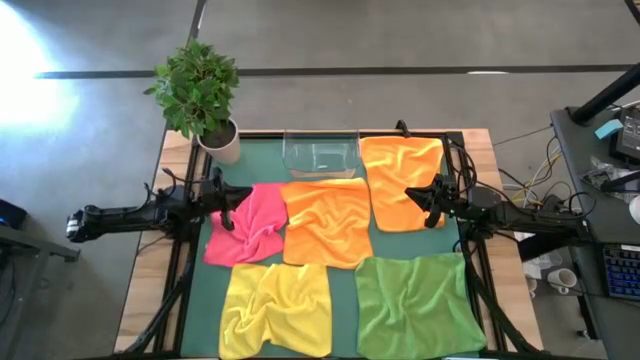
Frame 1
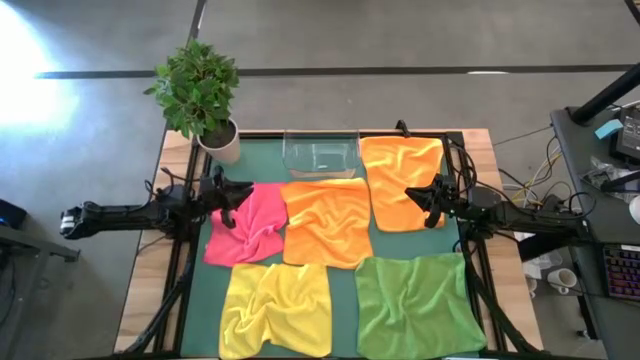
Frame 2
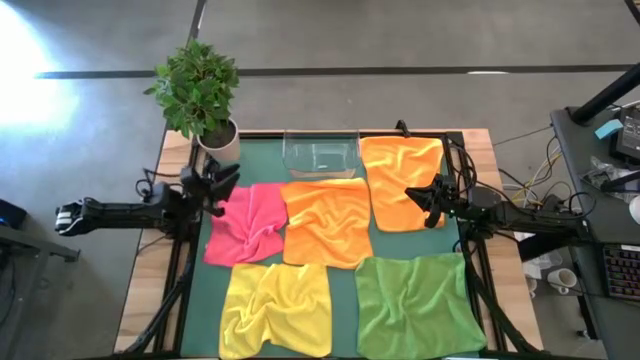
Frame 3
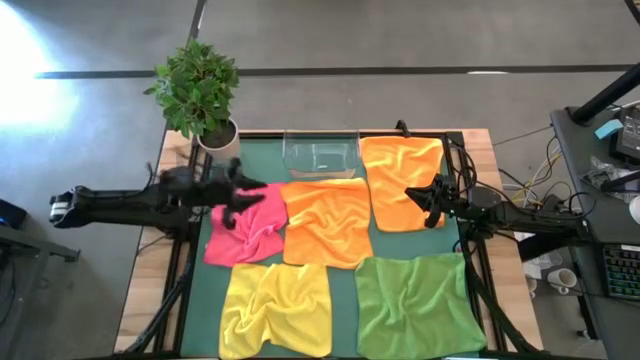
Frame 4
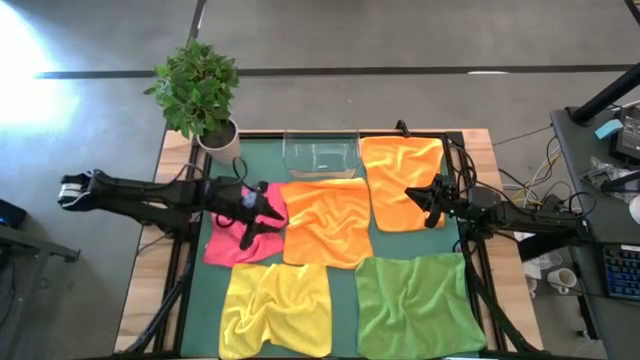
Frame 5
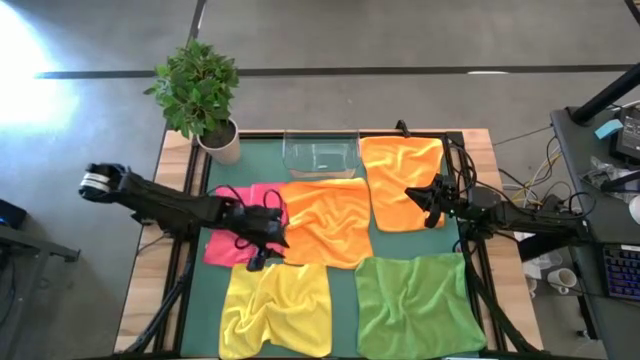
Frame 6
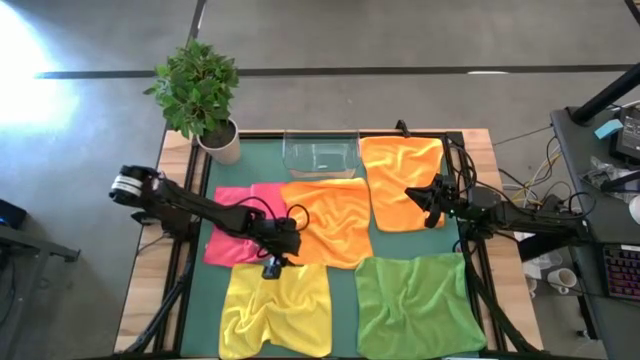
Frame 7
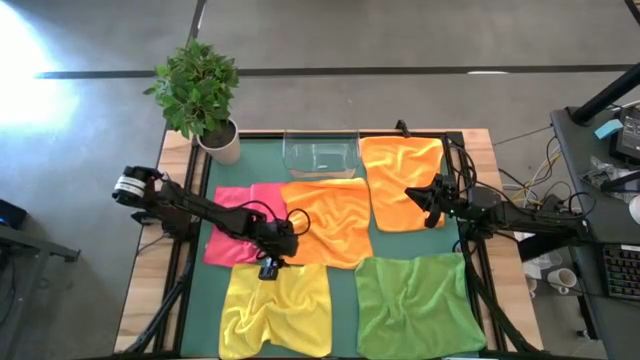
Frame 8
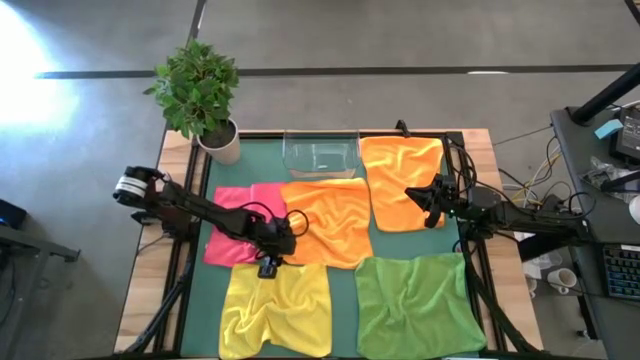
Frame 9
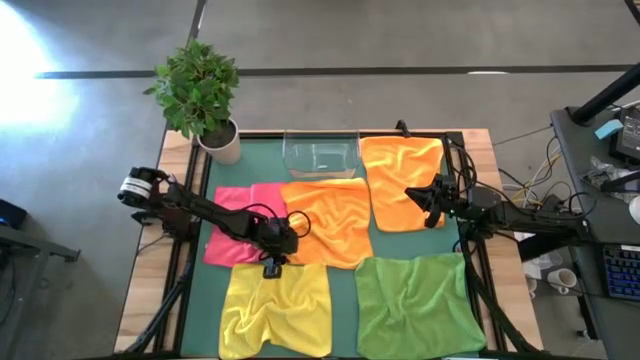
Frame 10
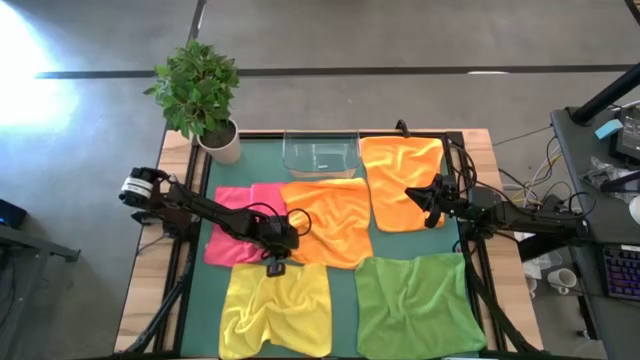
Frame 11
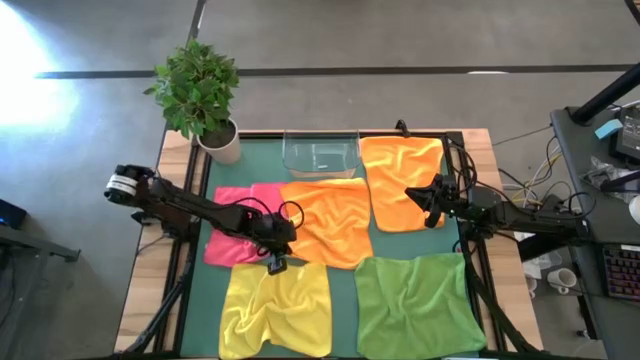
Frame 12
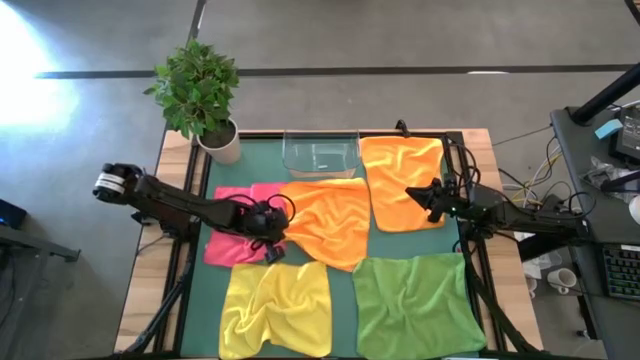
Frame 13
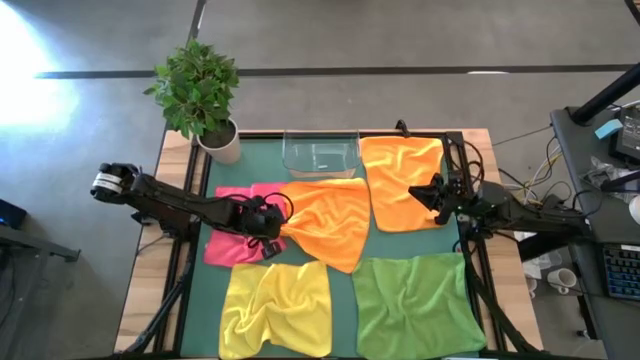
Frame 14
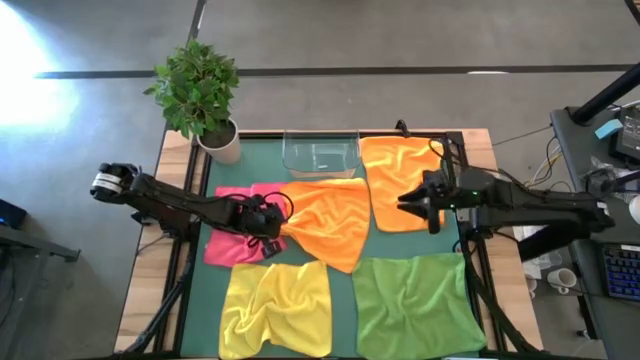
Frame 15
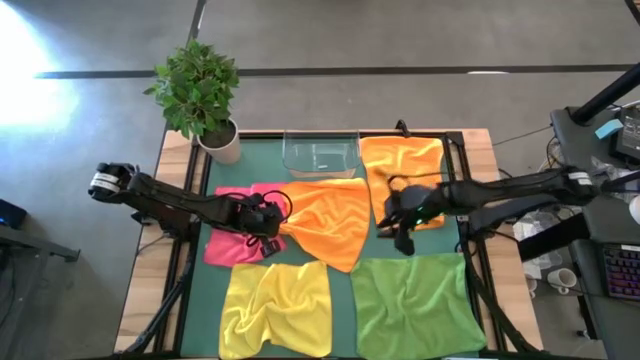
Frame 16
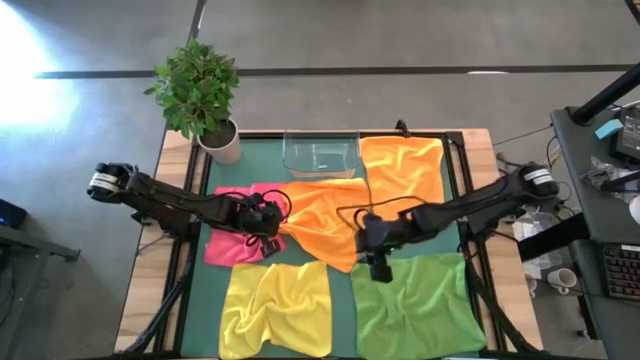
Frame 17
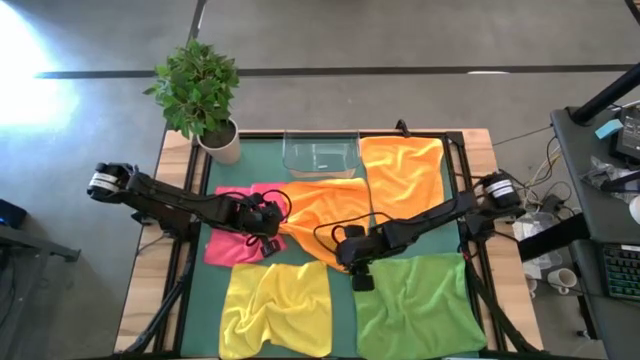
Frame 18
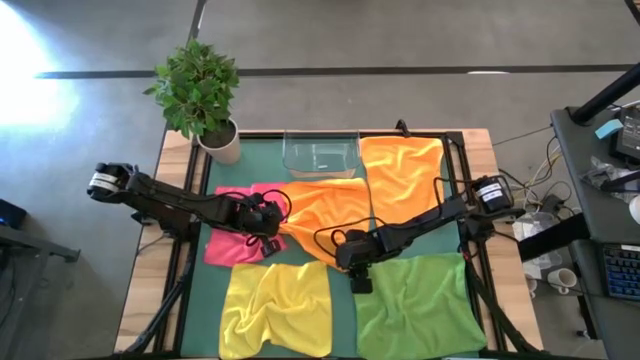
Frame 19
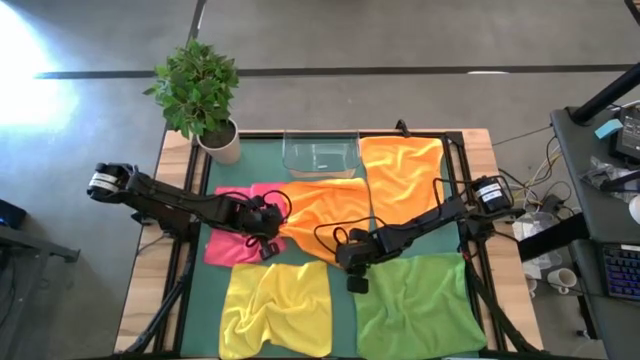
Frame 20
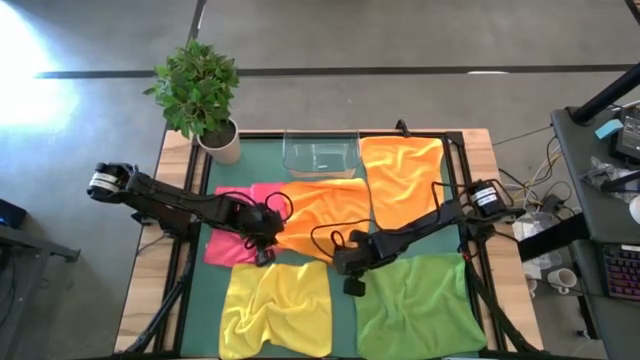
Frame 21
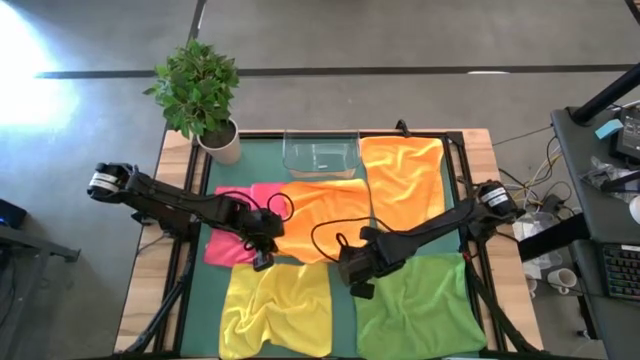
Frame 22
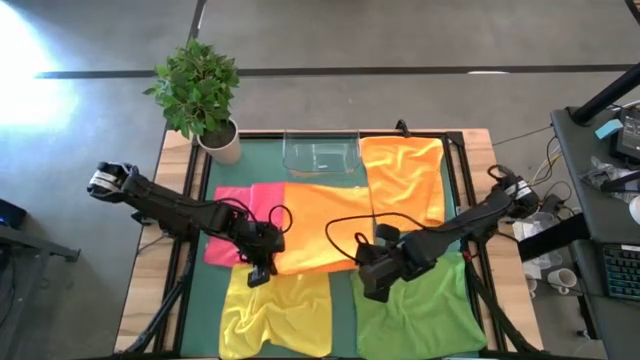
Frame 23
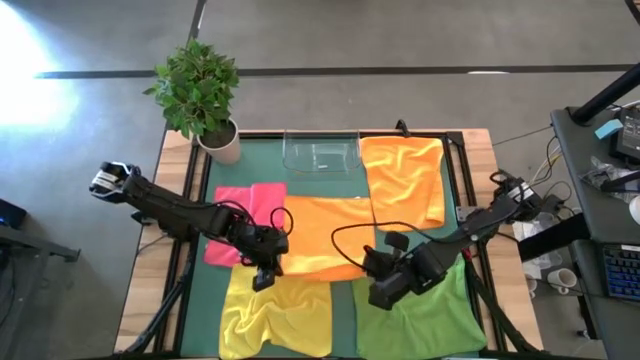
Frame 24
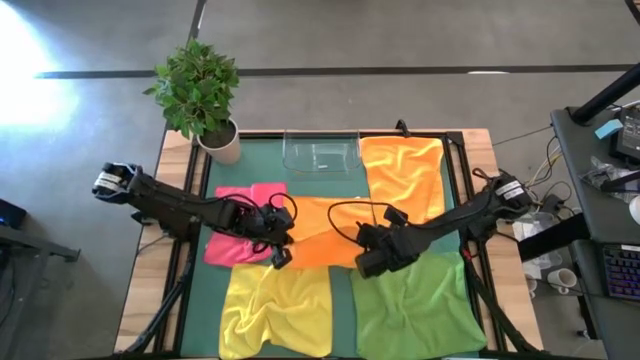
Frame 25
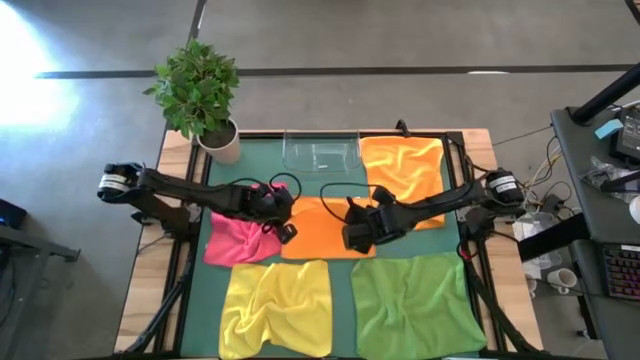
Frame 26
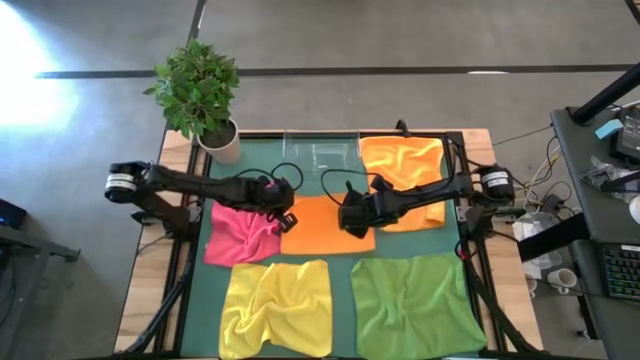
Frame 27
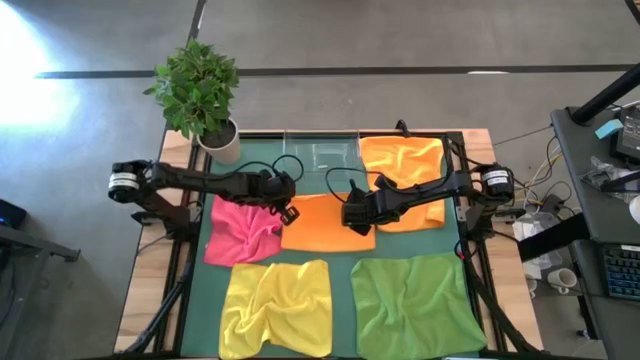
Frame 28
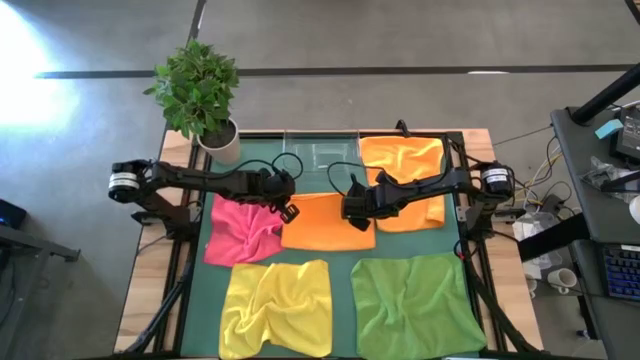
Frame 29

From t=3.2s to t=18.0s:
Task: Fold microfiber towels
Fold the left orange microfiber cloth

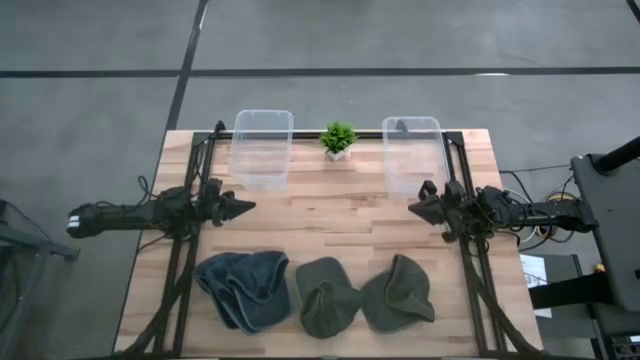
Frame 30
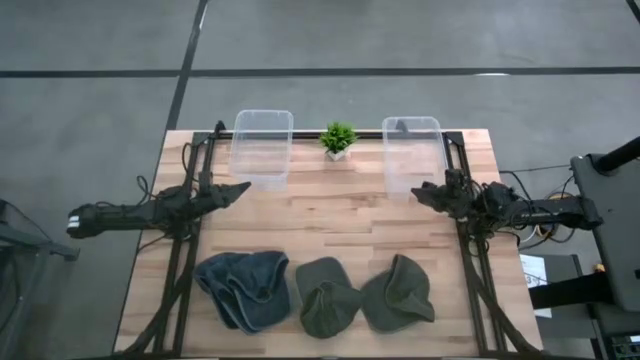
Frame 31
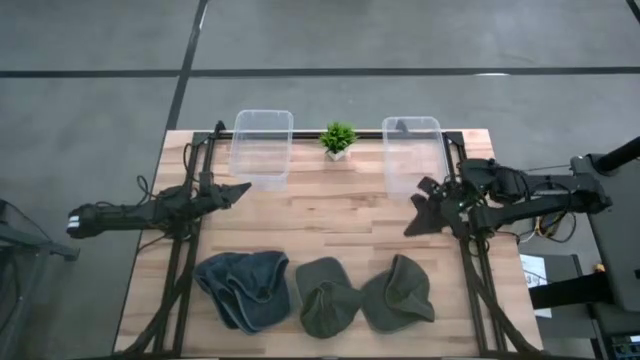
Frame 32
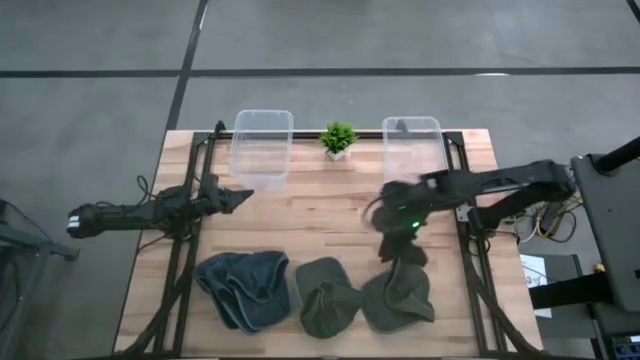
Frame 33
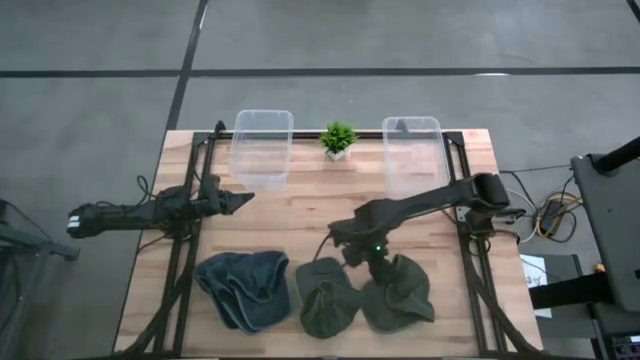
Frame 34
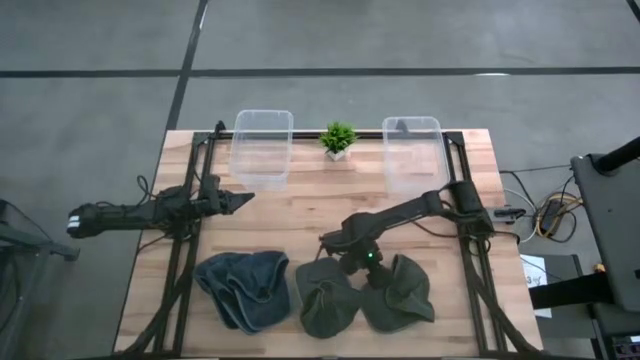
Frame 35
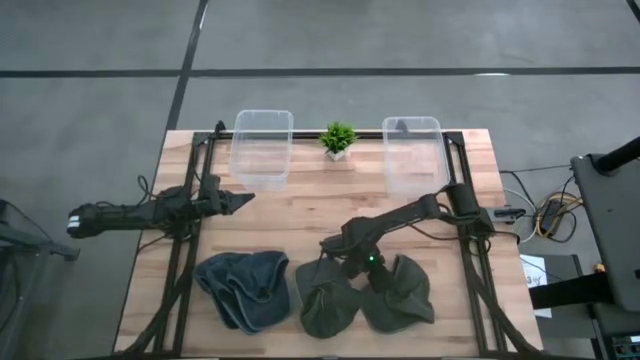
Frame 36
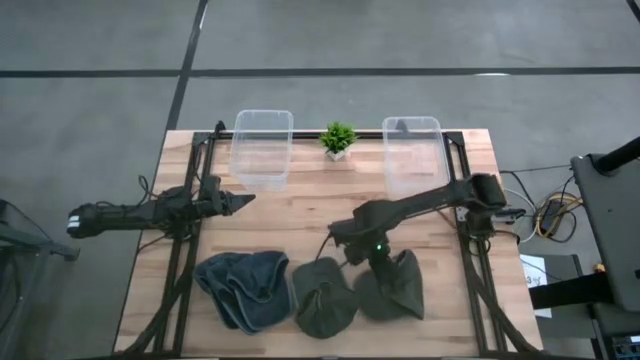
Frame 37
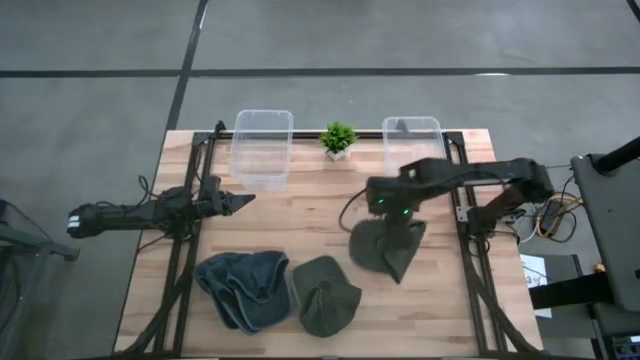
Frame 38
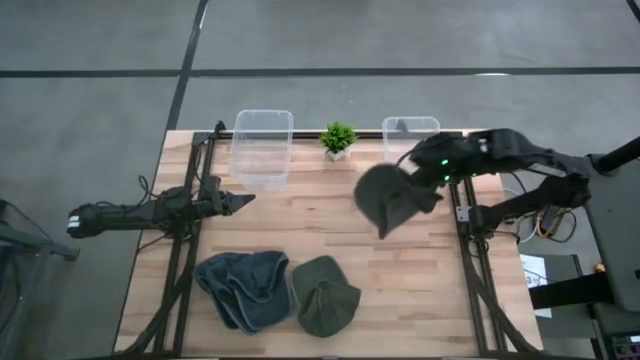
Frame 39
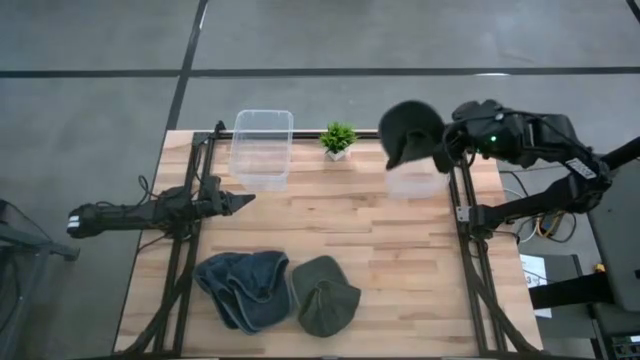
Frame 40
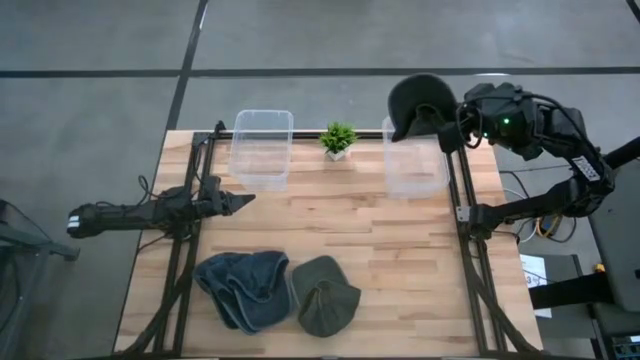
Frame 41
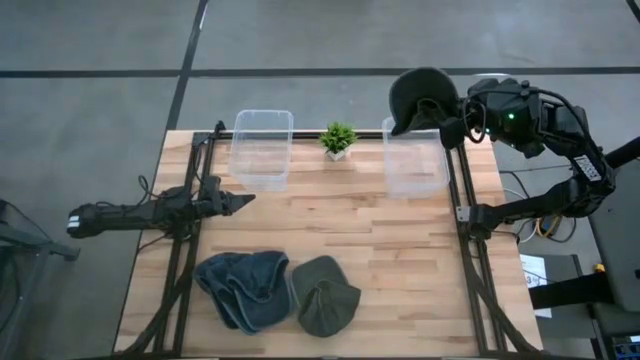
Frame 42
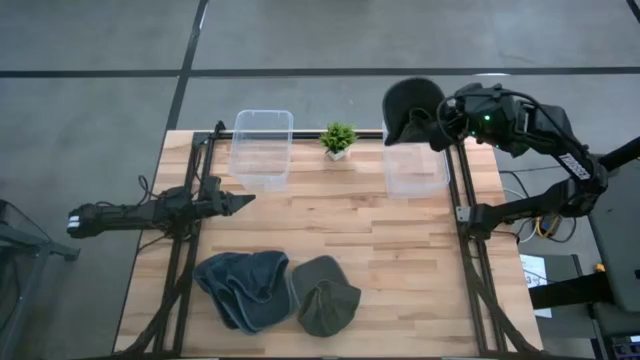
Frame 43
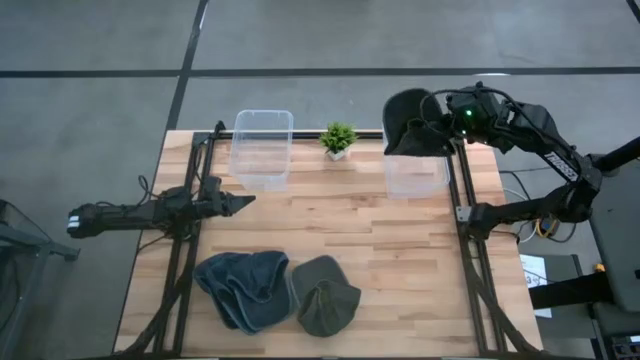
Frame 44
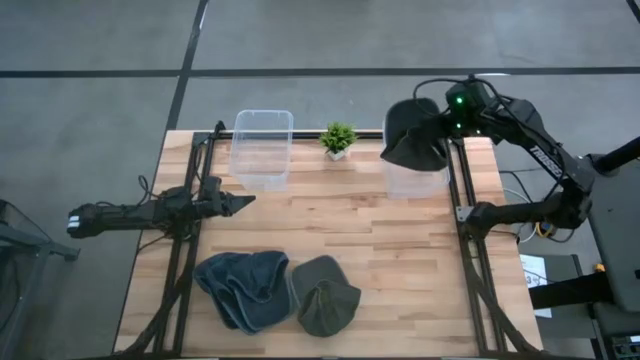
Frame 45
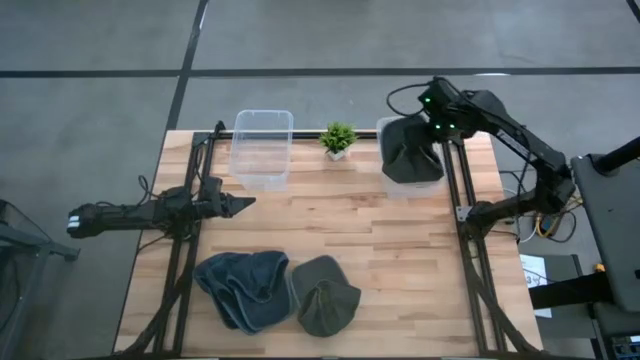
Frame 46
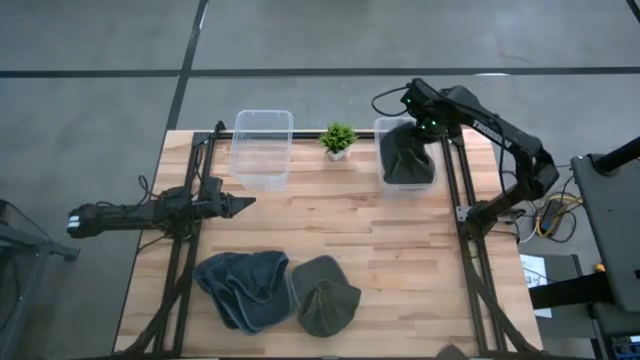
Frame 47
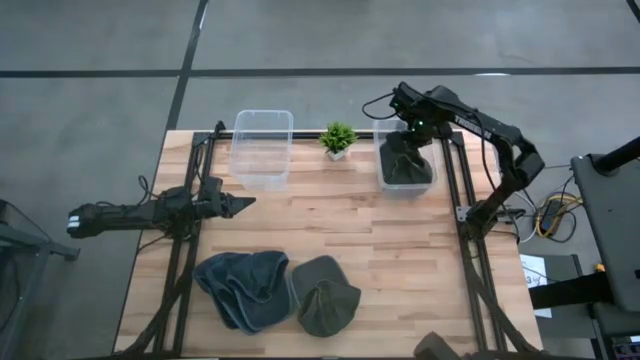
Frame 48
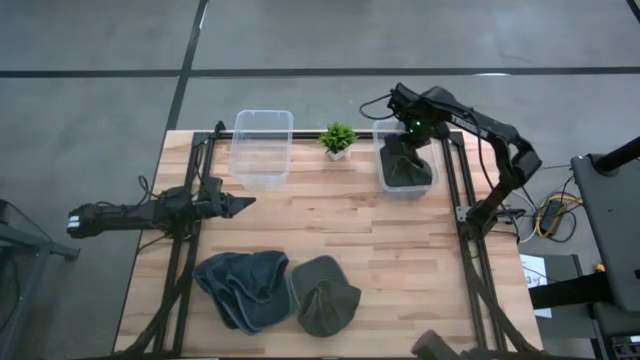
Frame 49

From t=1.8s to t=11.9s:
Task: Pick & Place hat
Put the right gray cap into the right transparent bin
